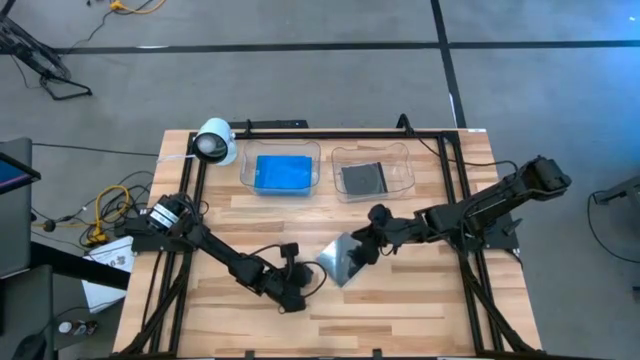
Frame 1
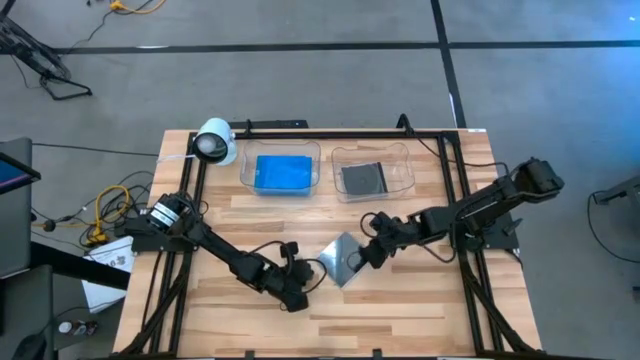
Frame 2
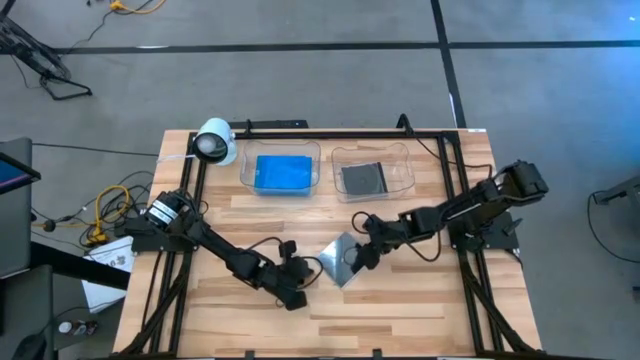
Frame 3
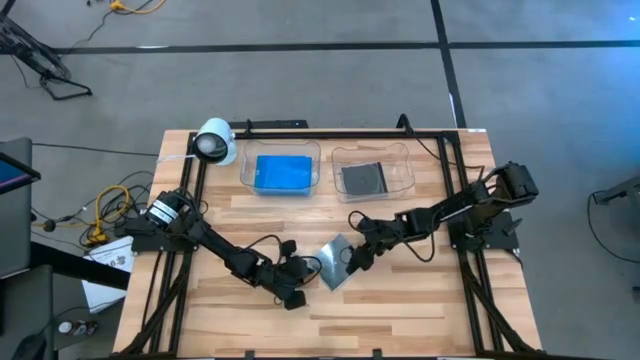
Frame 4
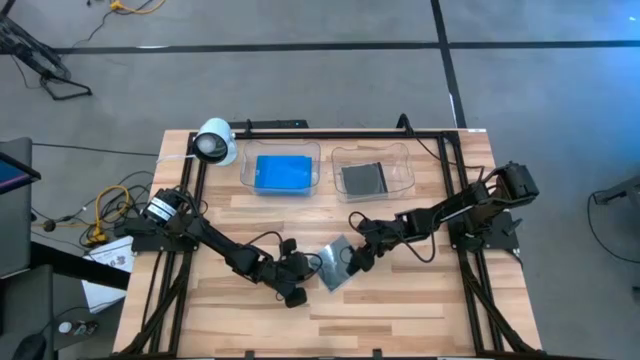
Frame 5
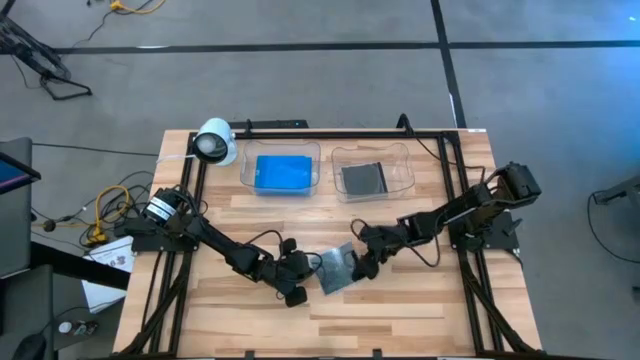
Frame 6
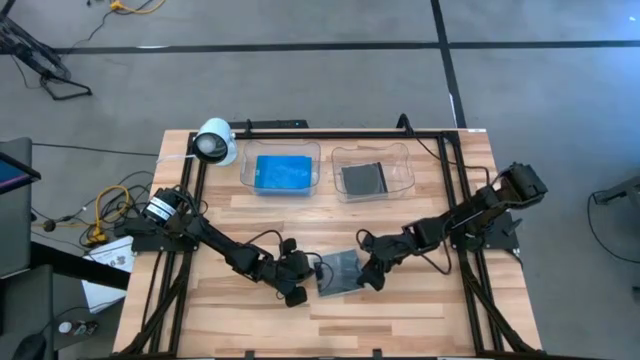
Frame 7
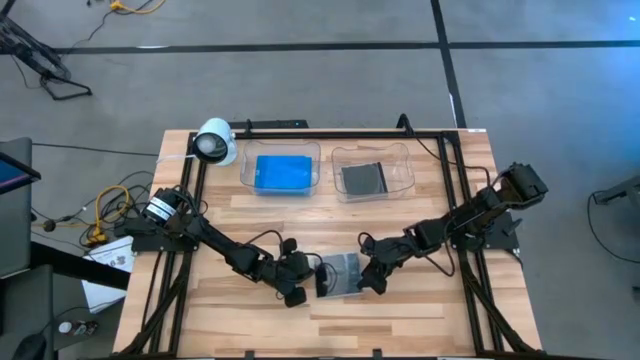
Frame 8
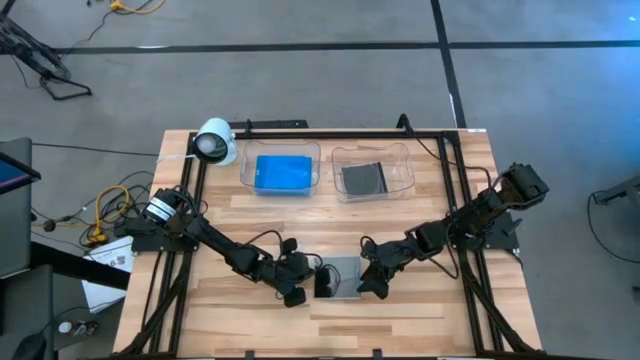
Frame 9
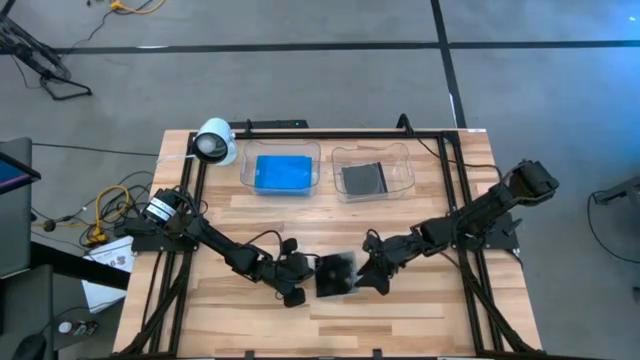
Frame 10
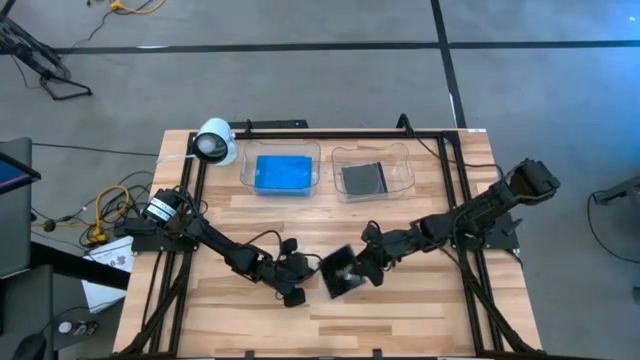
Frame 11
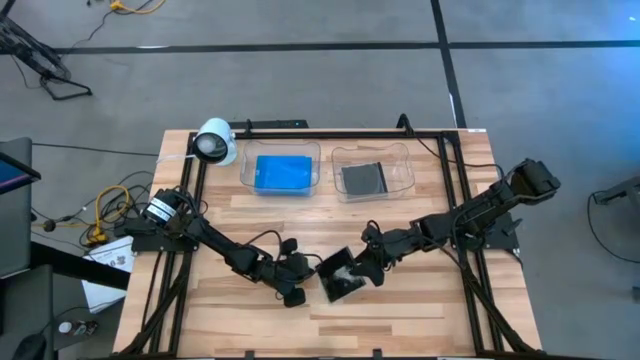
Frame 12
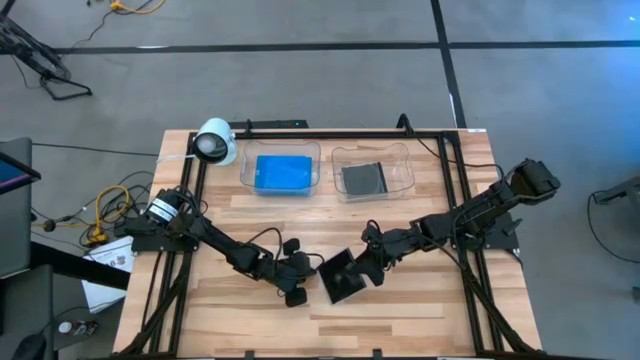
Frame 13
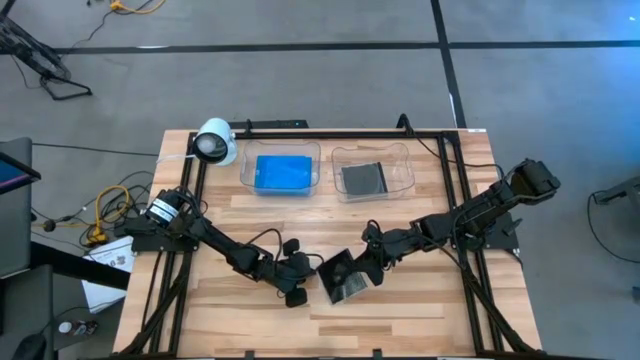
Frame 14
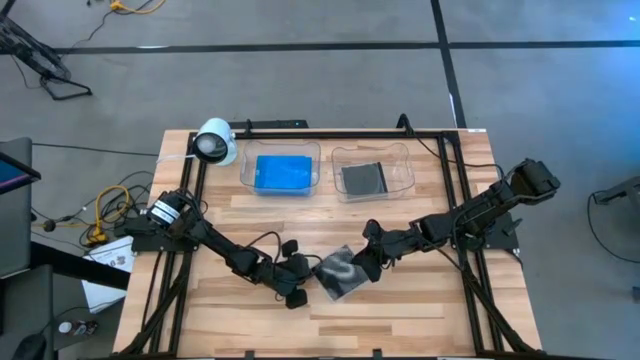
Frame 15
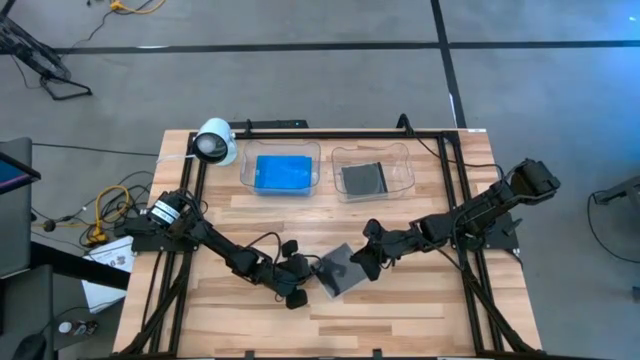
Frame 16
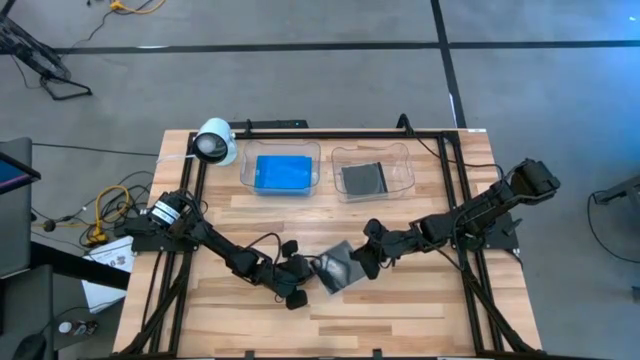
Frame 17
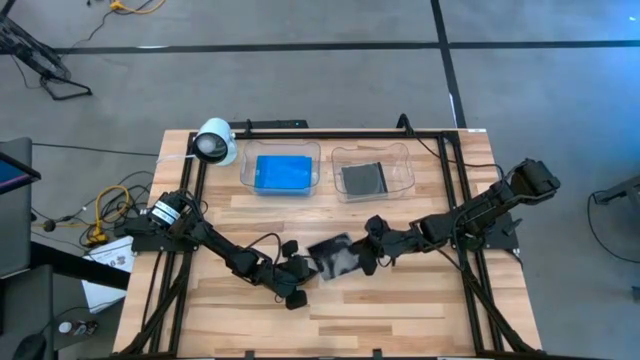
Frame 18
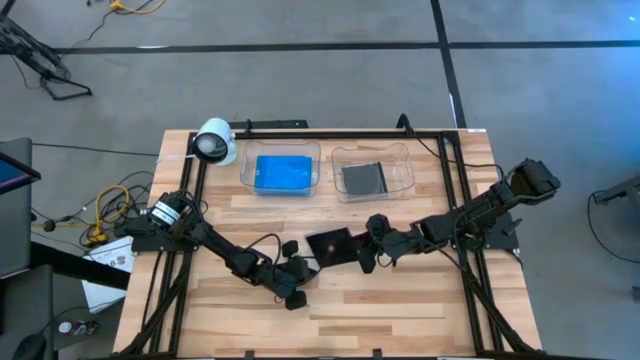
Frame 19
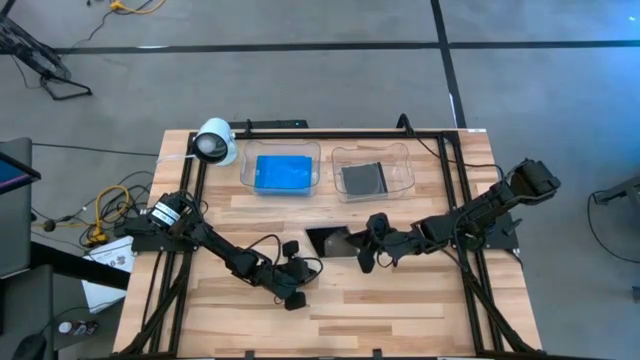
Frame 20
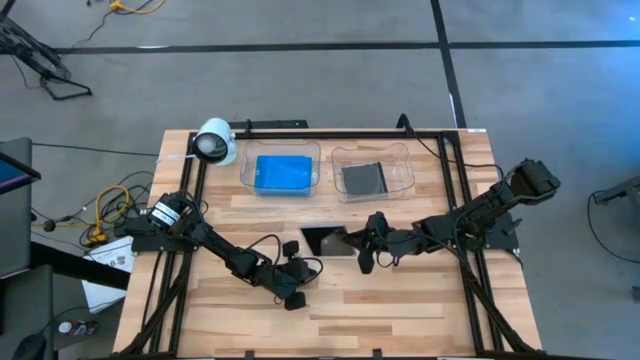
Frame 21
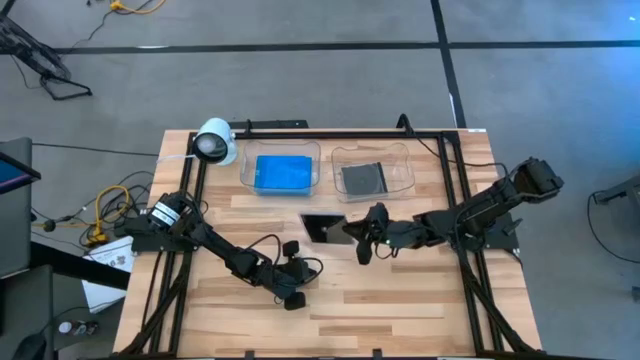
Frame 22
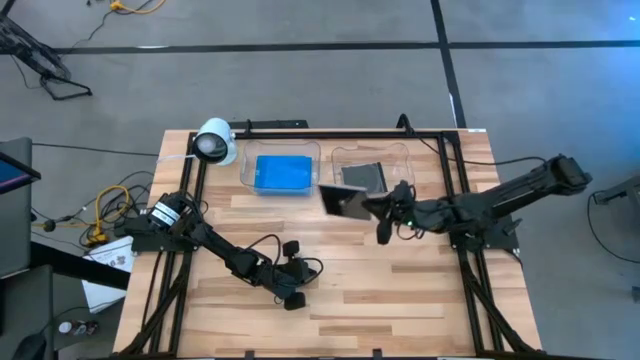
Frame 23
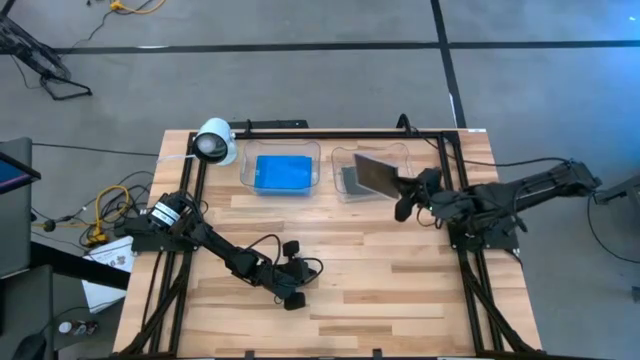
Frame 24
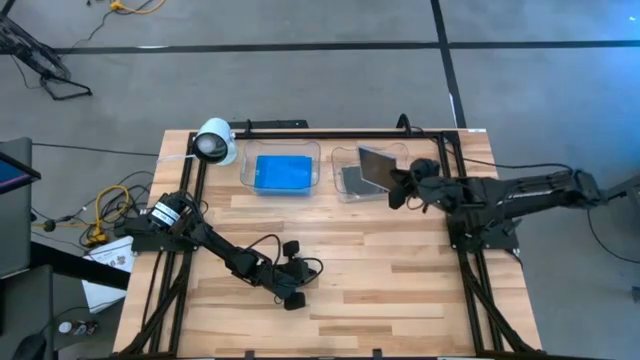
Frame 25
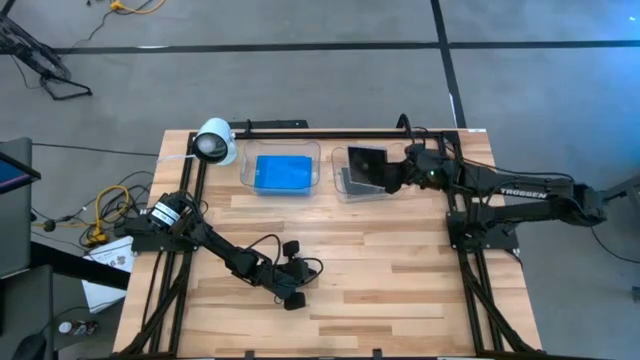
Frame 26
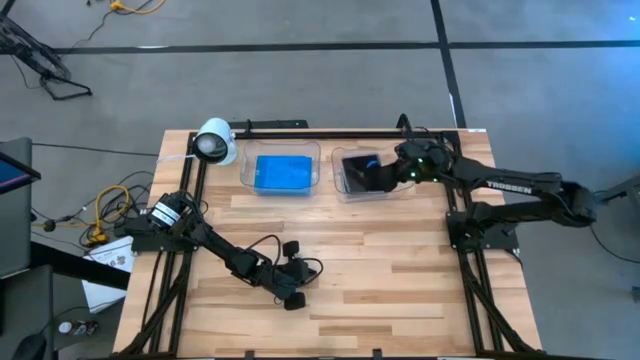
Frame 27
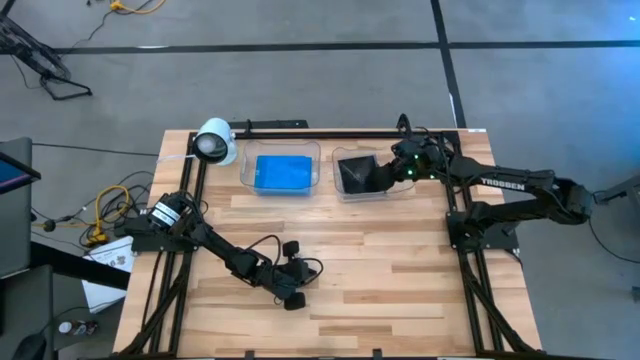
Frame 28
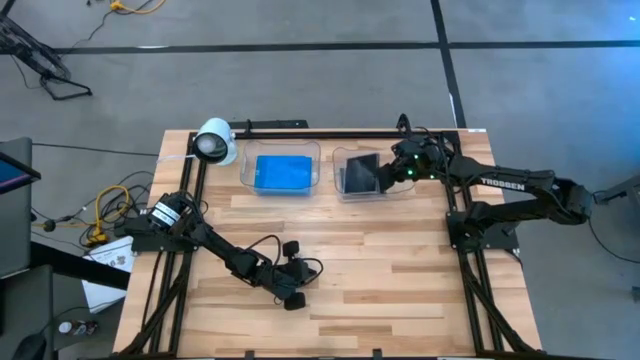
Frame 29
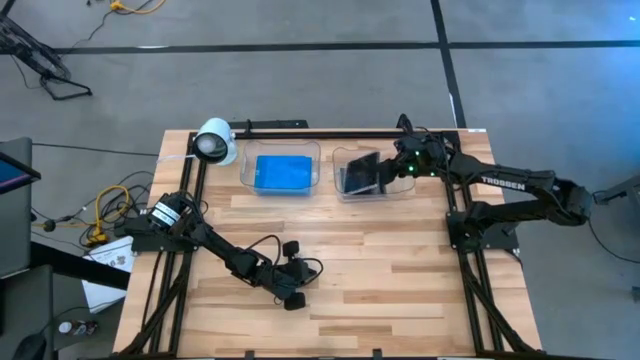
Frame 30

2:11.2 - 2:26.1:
Task: Pick & place jewel cases by type
Put the black cd case into the right transparent bin
